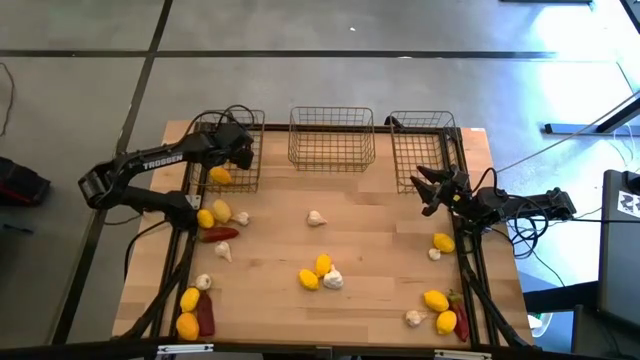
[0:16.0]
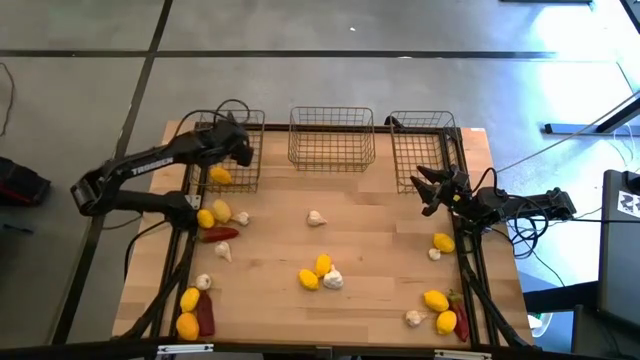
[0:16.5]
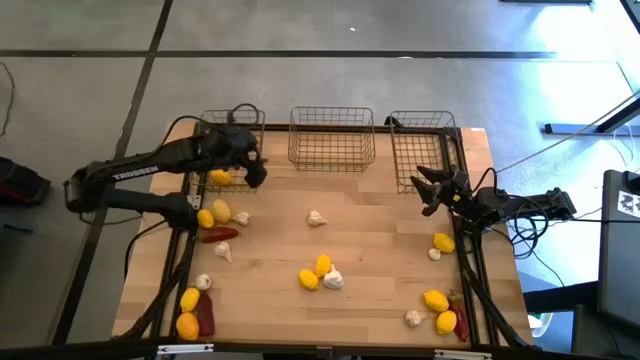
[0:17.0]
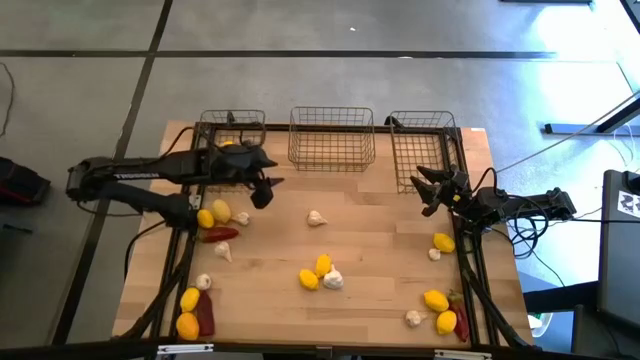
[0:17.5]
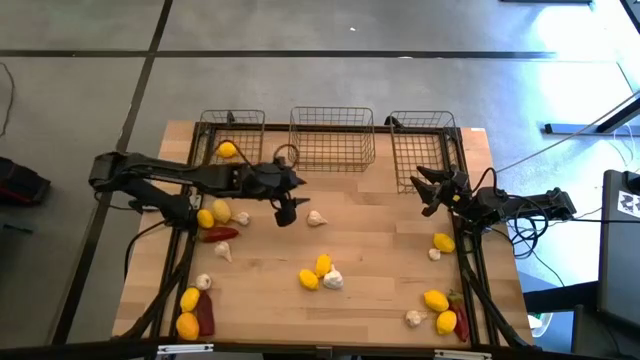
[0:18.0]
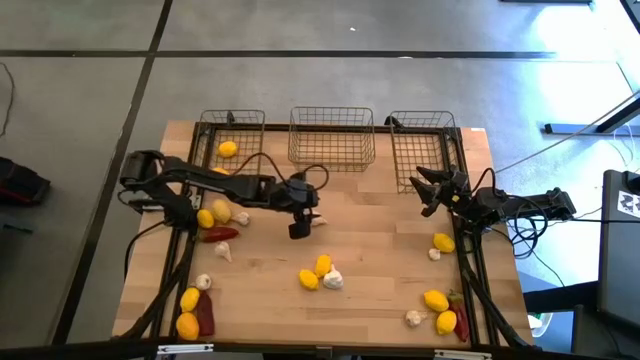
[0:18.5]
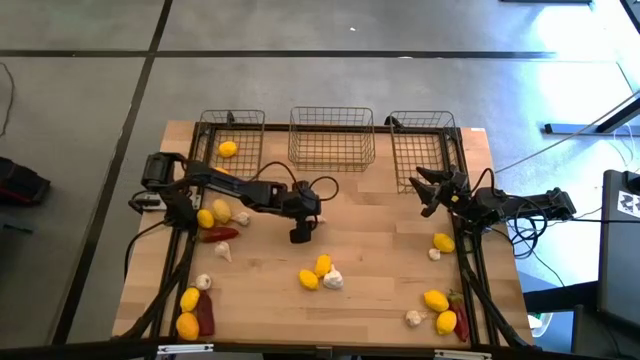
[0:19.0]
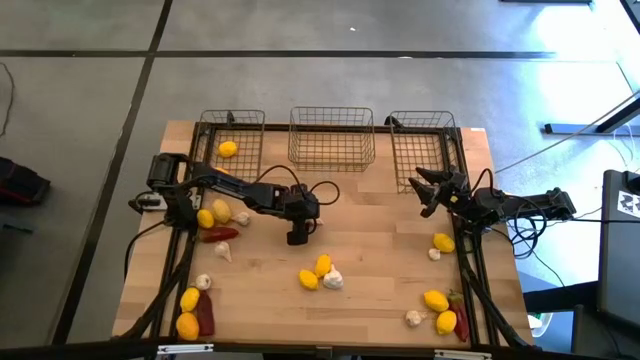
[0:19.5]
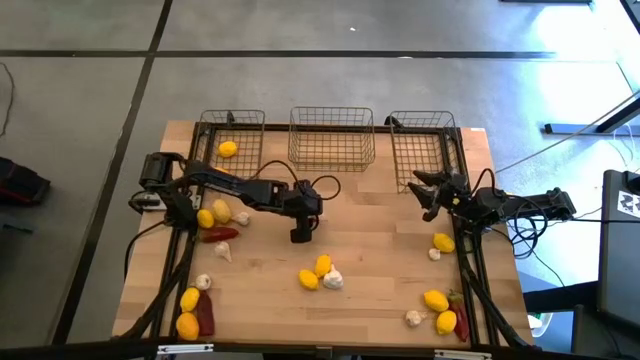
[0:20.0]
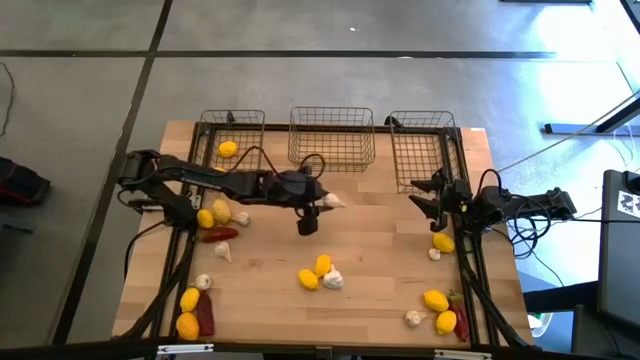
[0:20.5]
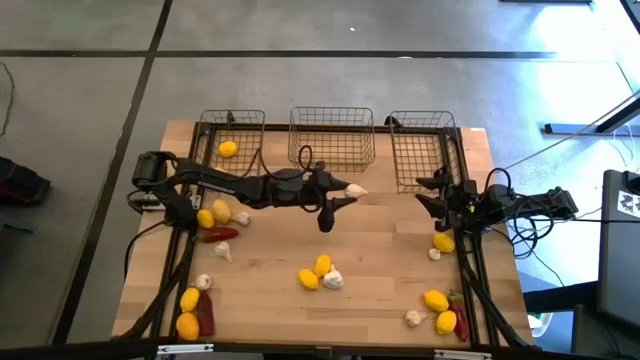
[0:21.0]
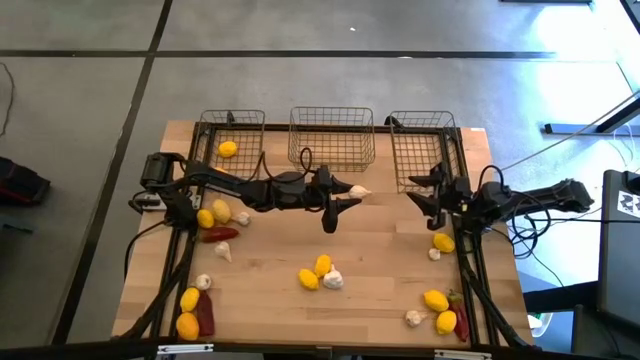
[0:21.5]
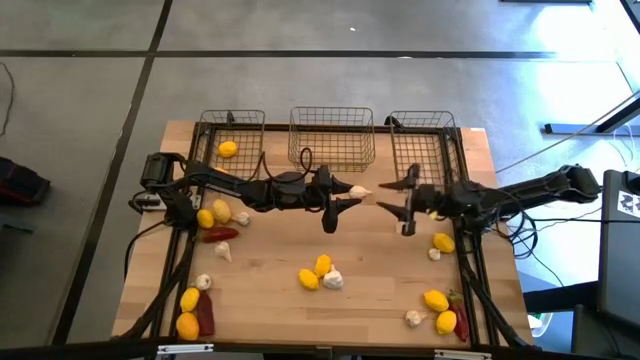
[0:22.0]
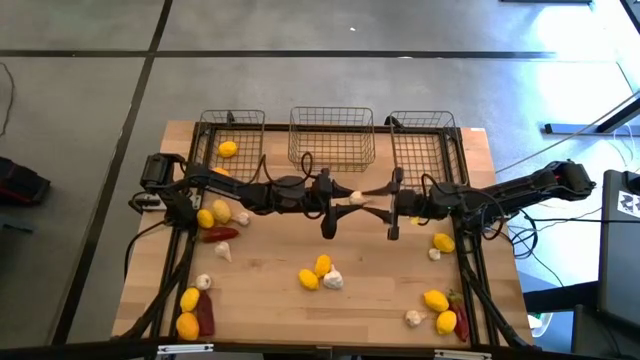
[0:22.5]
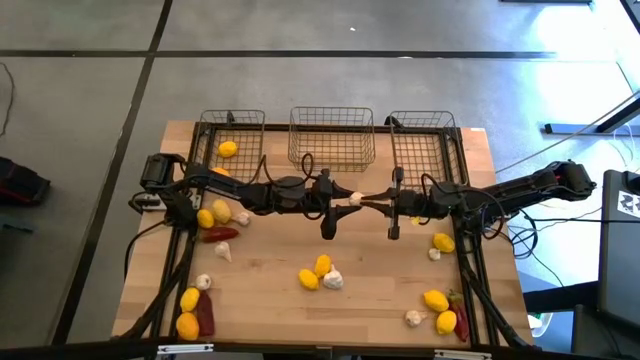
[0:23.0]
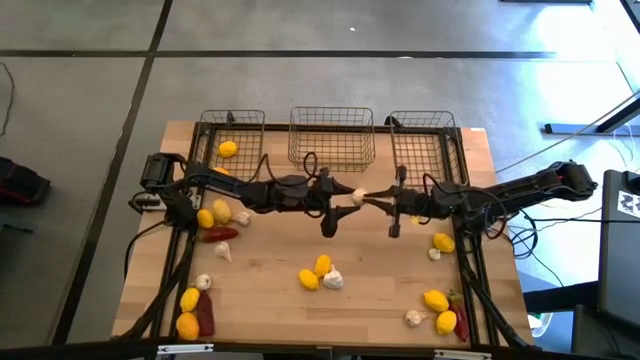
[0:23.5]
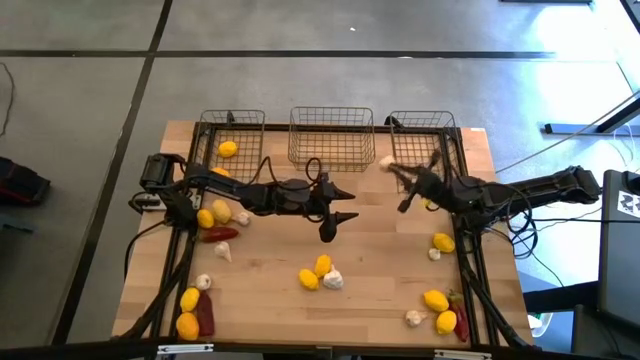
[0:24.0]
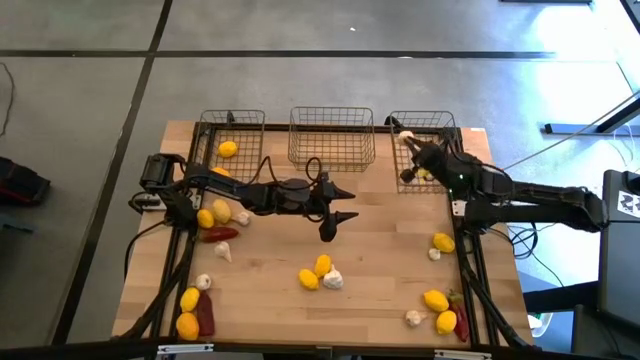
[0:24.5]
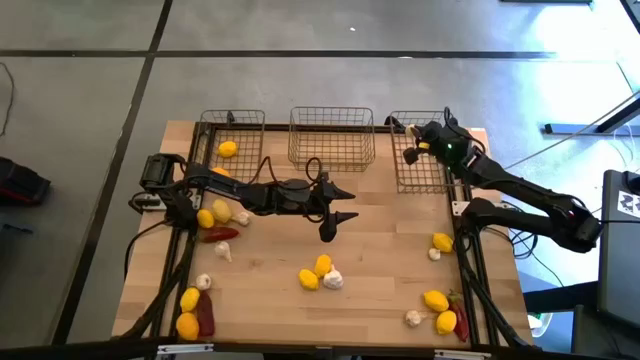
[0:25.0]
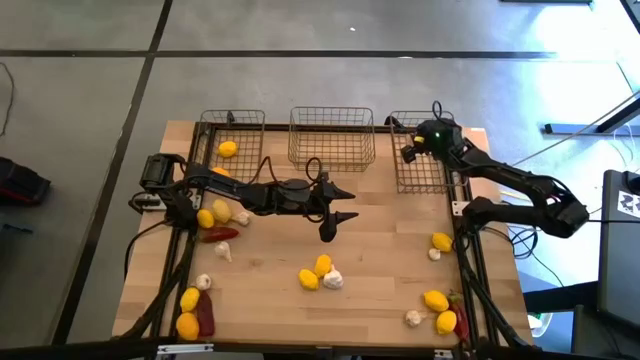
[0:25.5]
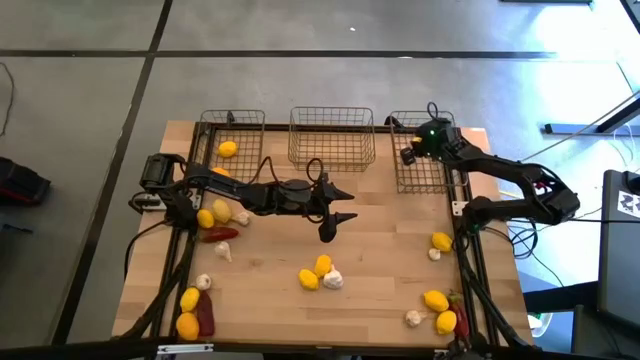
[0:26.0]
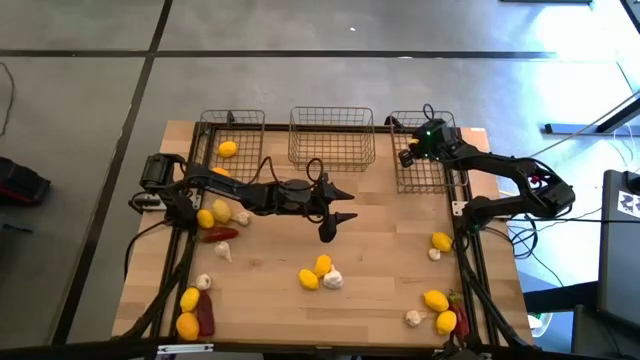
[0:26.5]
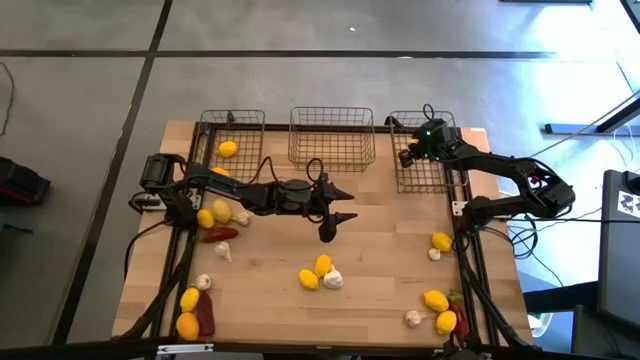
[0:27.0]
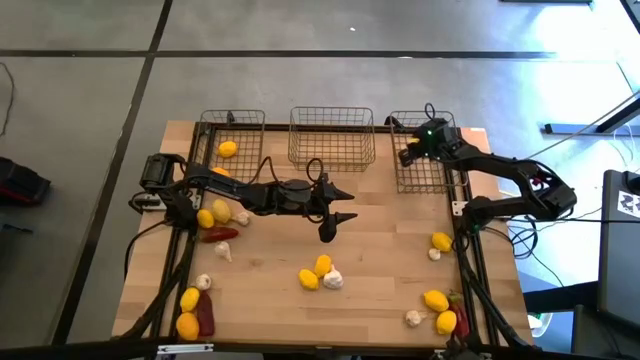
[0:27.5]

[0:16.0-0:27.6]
Task: Sort produce into baskets
Put the white garlic into the right gold wire basket

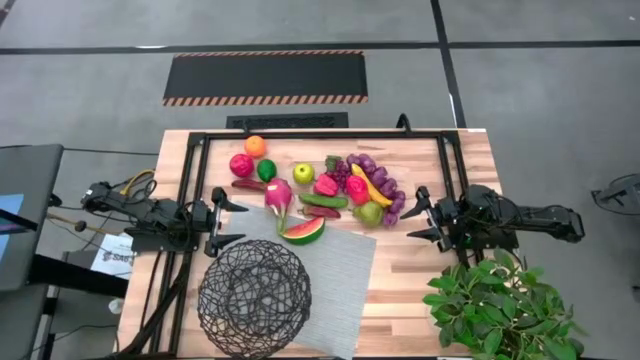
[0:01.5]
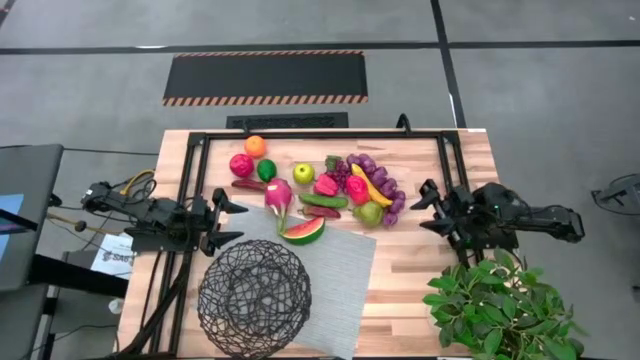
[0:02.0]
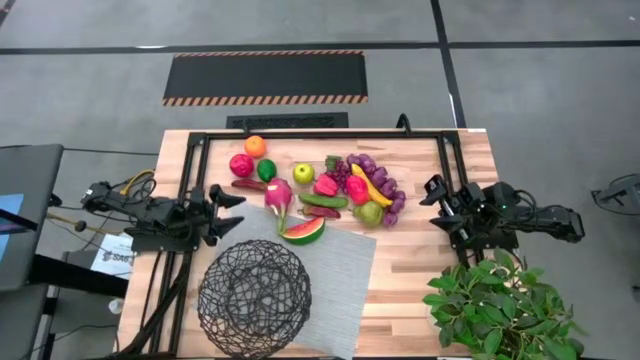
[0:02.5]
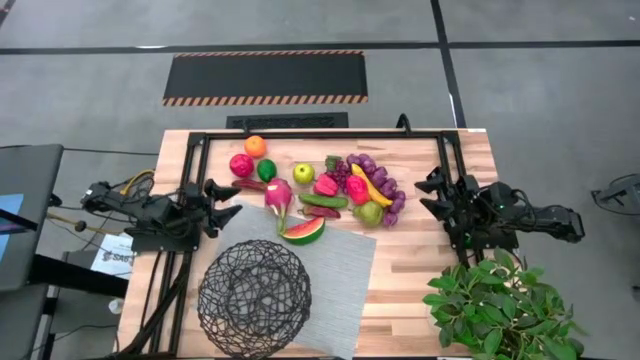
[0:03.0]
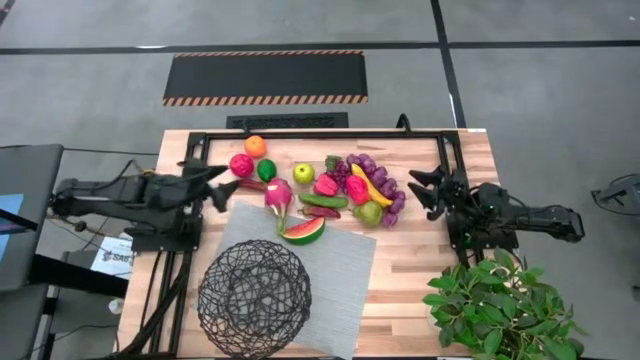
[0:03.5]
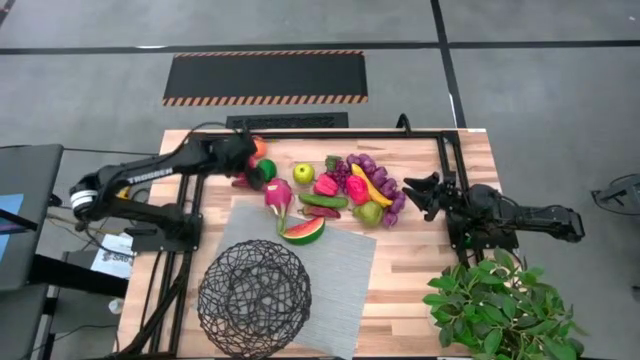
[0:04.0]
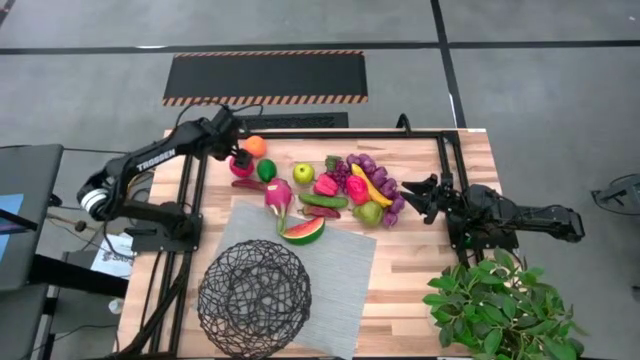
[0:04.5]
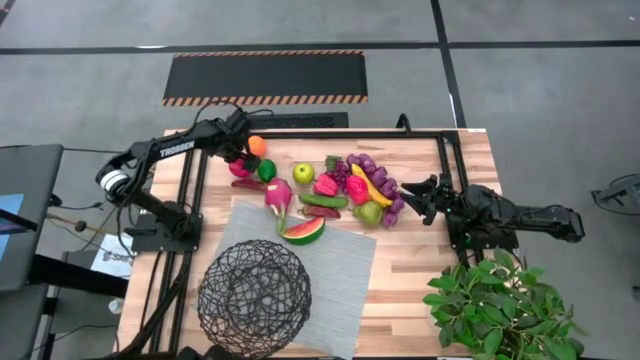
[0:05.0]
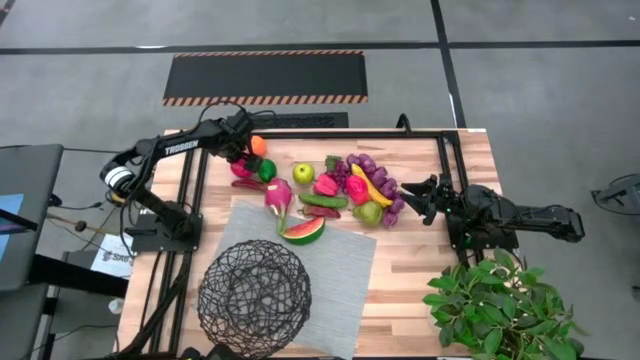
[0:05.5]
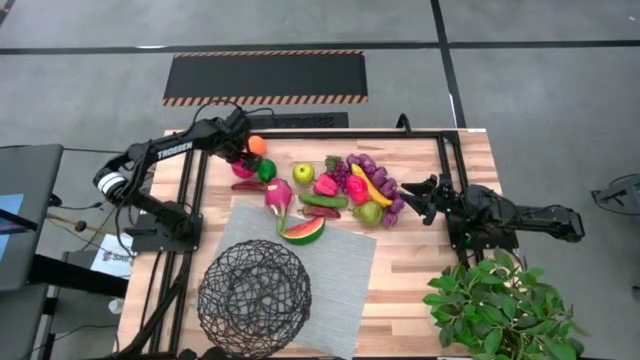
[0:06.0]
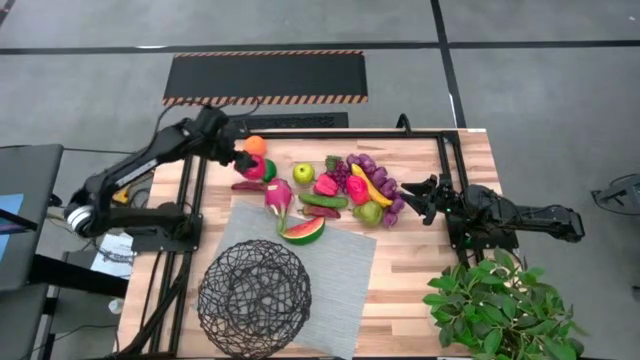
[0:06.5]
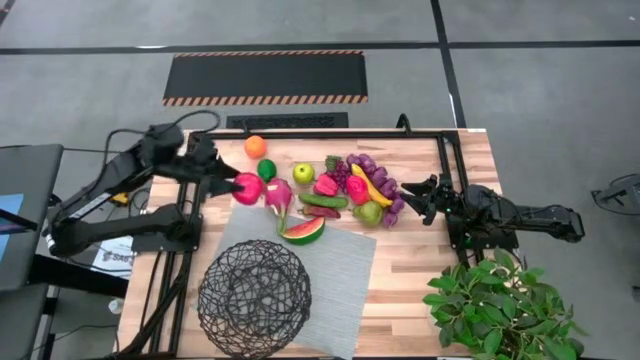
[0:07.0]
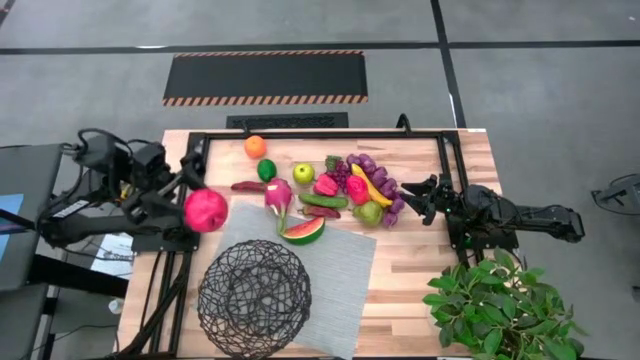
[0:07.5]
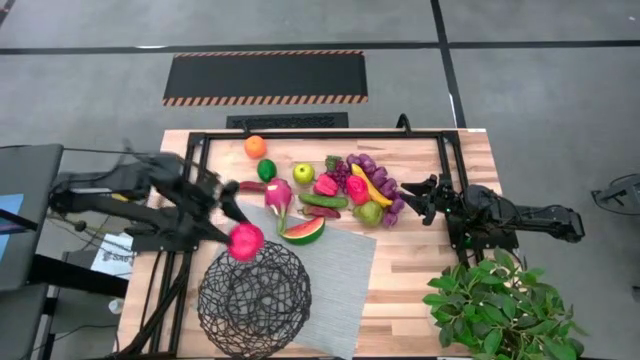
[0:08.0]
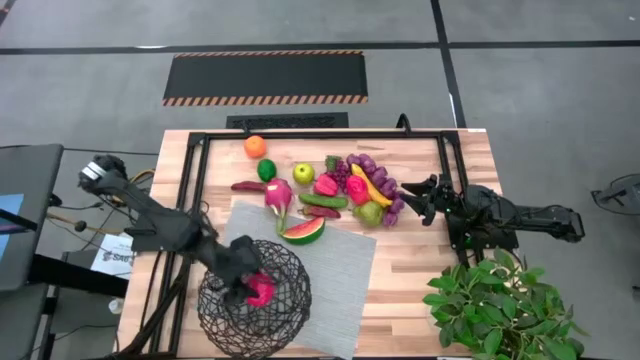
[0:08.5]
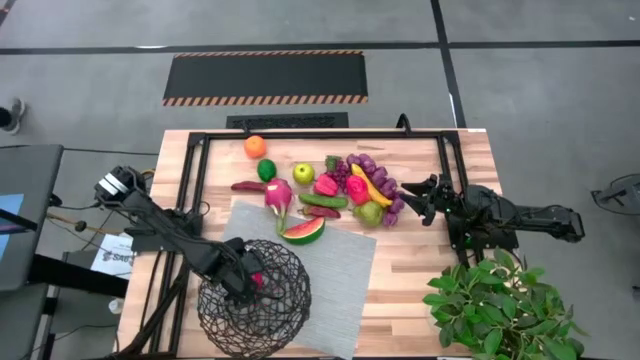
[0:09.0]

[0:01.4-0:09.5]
Task: Build produce basket
Put the red apple into the mesh basket
